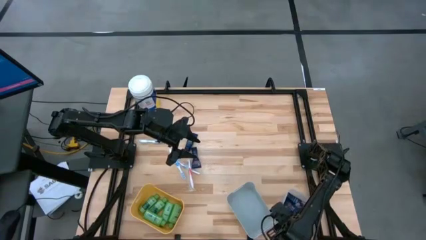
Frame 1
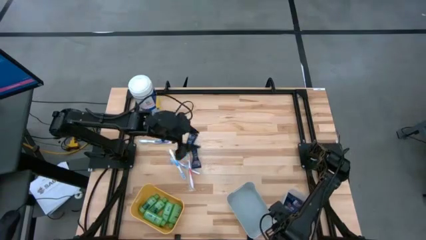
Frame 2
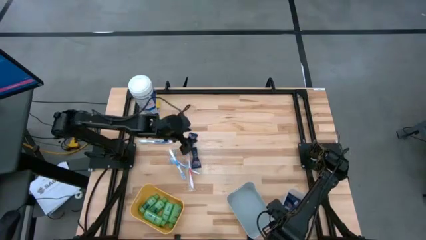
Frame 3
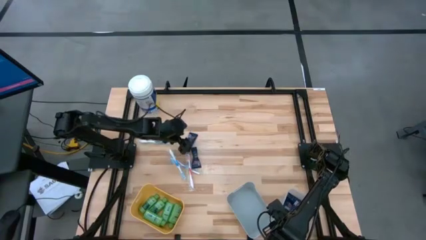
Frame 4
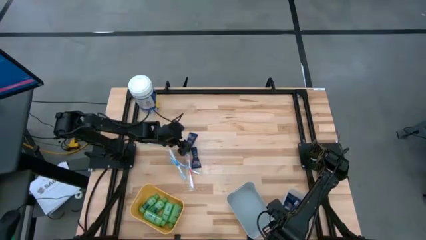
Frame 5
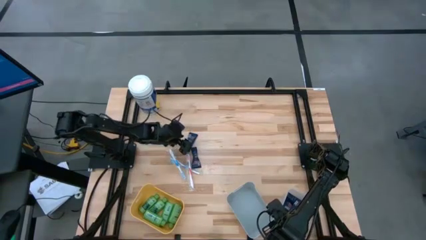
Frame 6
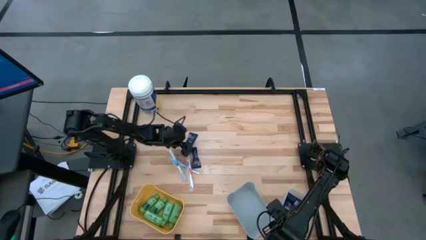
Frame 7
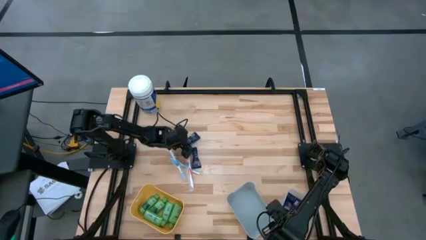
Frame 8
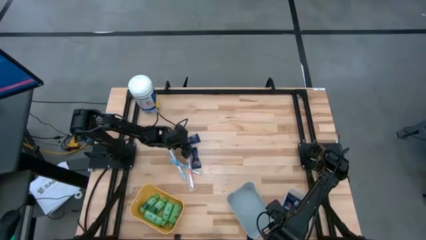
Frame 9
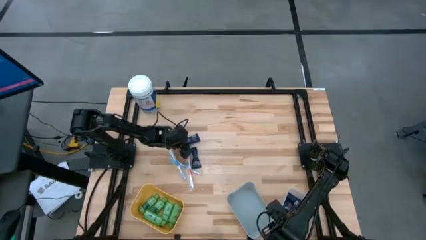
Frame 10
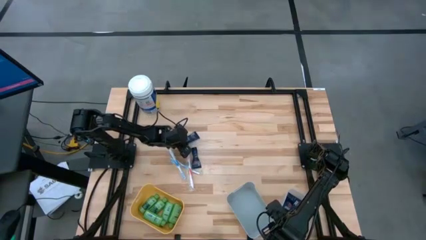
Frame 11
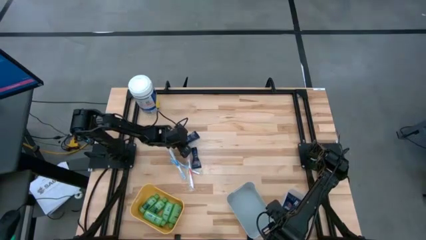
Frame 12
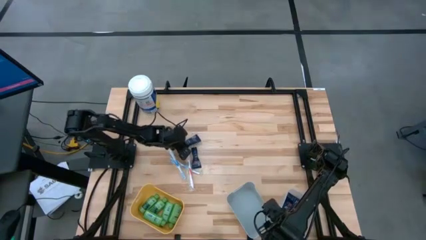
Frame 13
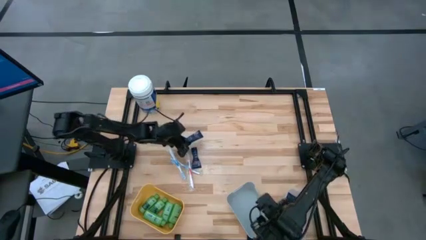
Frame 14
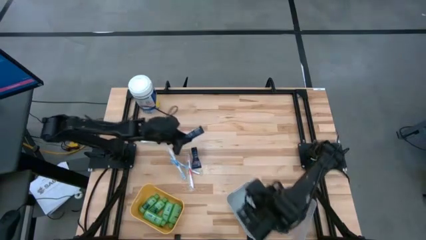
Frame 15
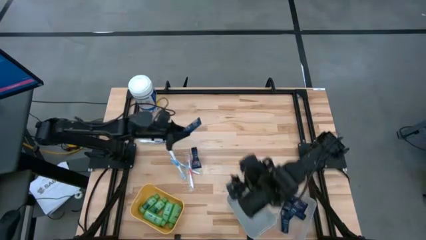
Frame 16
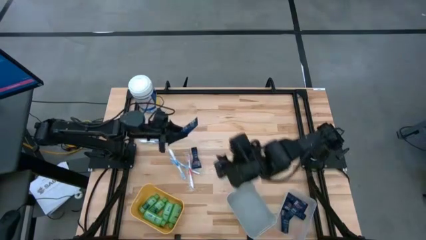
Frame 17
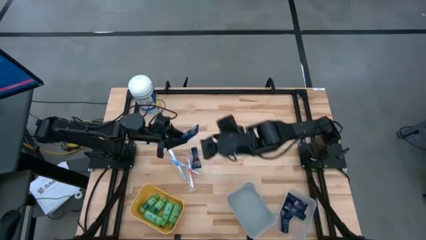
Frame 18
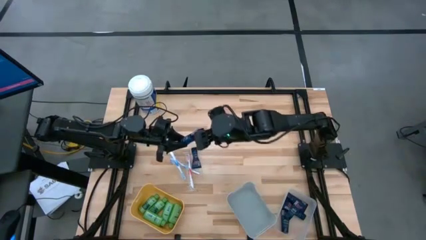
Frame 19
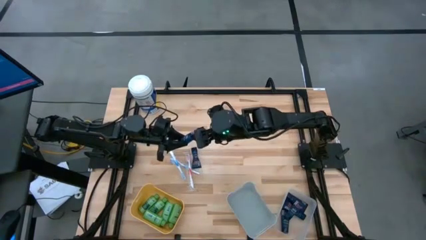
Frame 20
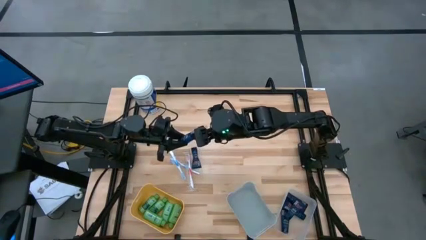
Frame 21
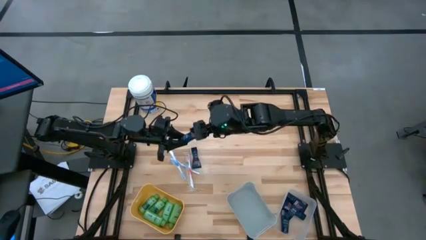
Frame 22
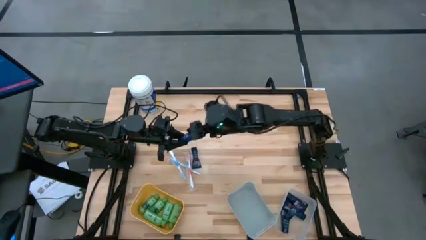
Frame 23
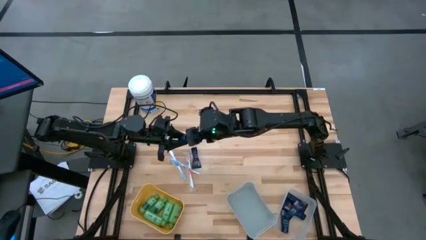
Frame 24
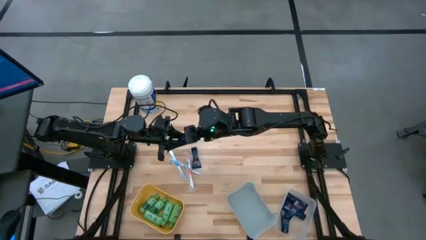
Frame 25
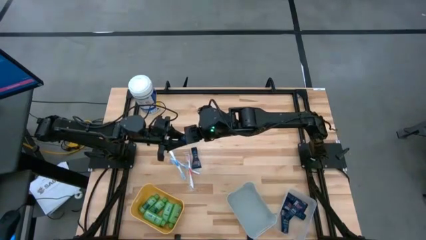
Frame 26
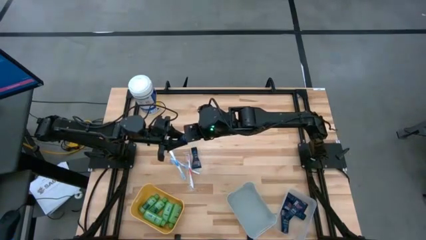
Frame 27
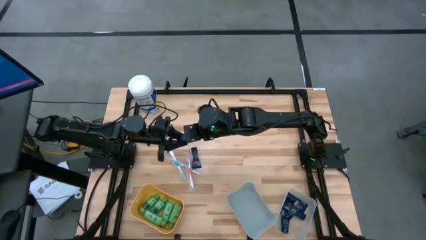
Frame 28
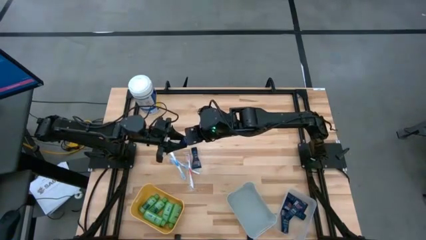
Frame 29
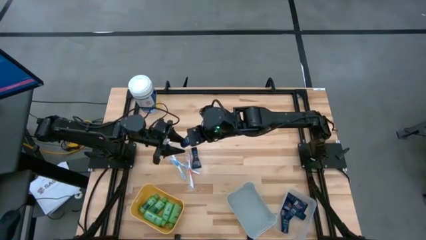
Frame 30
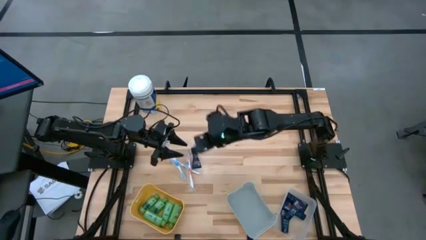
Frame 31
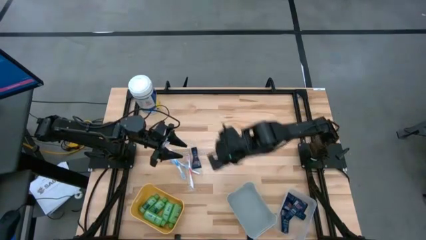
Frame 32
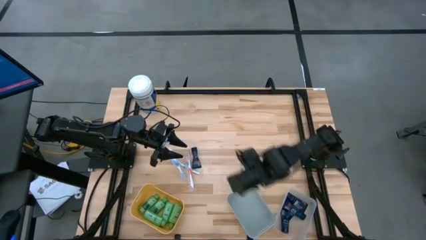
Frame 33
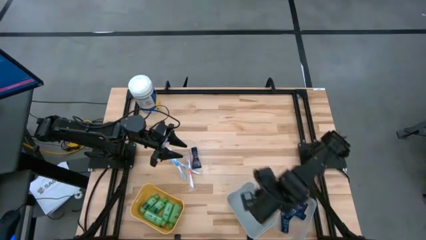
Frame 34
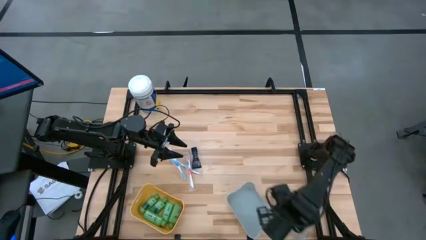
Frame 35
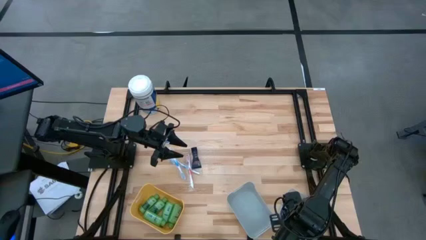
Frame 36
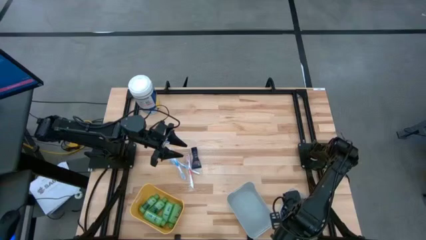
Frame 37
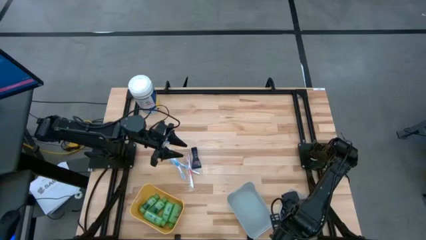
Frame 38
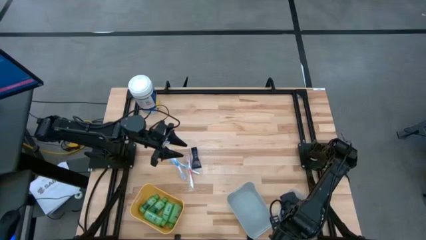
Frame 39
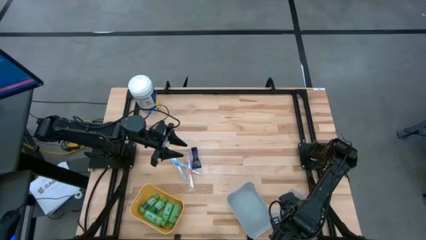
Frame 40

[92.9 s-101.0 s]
Task: Pick & Place Travel size toiletries
Put the blue shave cream into the transparent bin

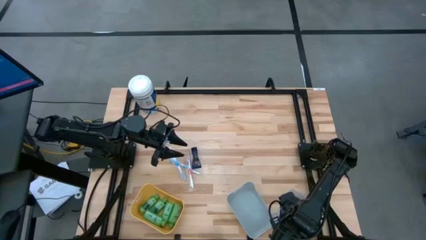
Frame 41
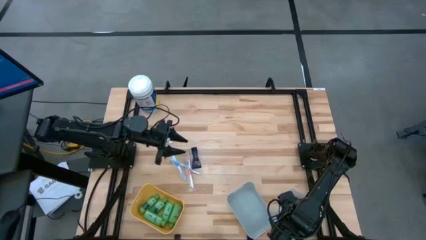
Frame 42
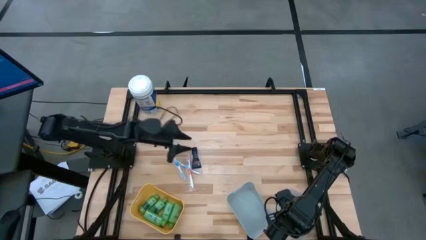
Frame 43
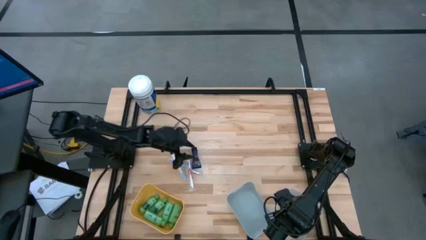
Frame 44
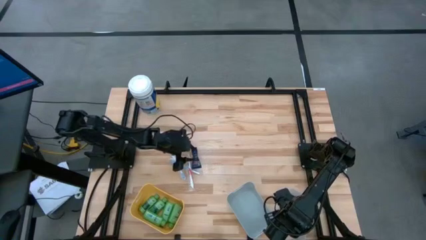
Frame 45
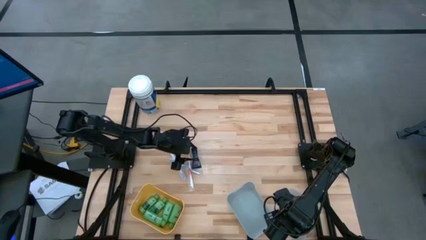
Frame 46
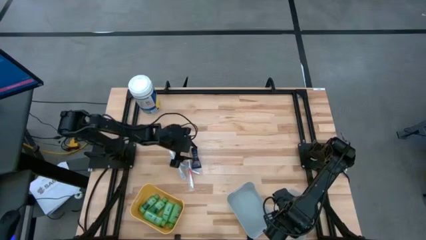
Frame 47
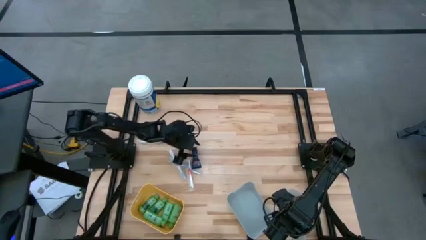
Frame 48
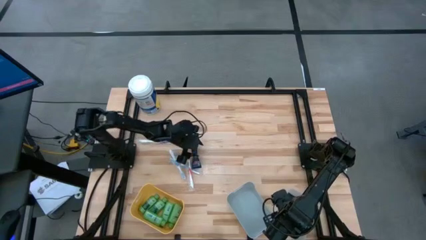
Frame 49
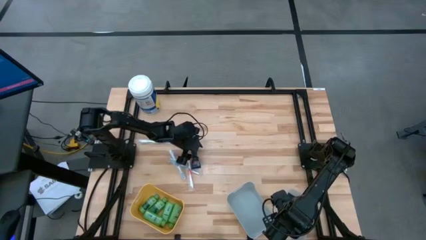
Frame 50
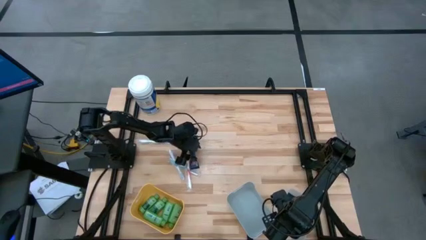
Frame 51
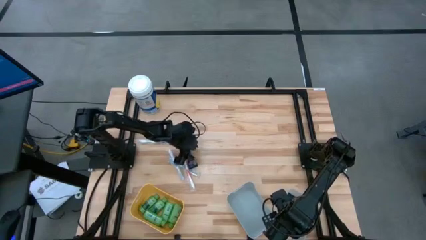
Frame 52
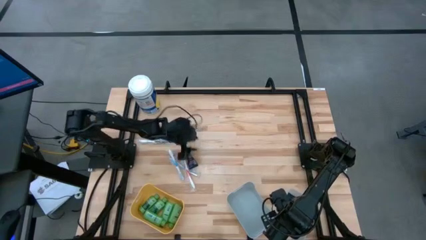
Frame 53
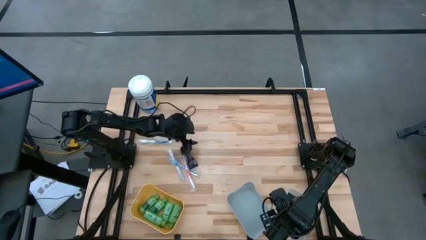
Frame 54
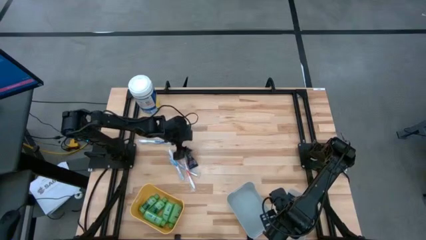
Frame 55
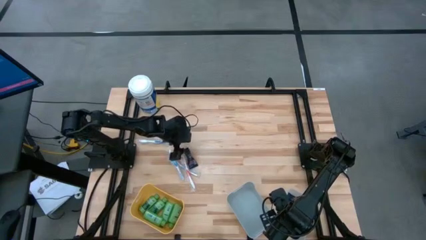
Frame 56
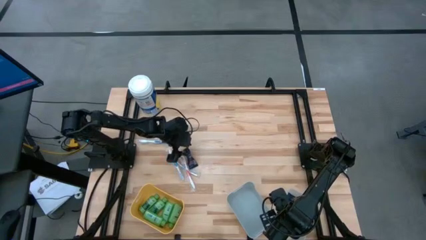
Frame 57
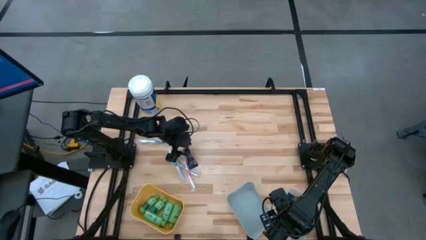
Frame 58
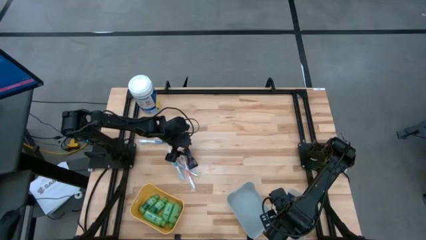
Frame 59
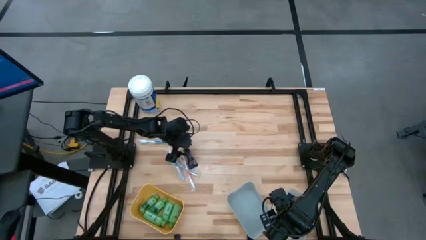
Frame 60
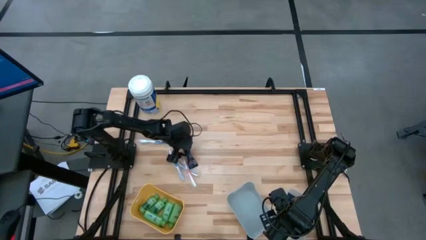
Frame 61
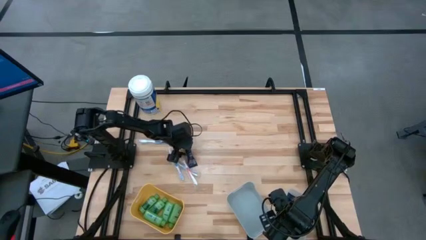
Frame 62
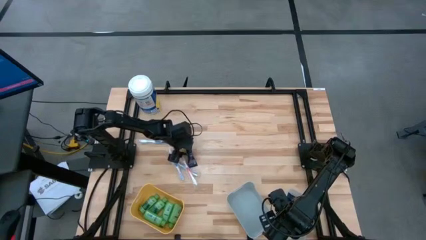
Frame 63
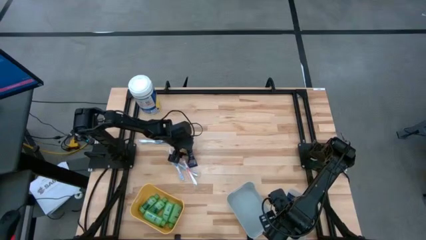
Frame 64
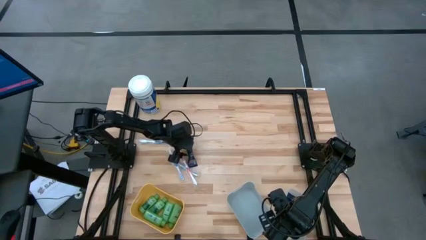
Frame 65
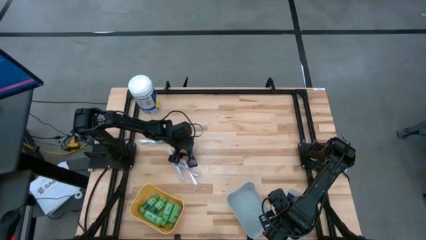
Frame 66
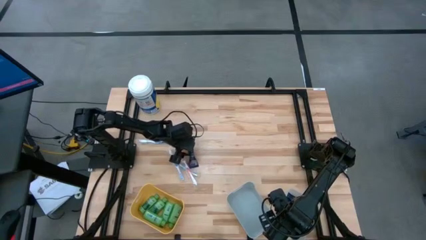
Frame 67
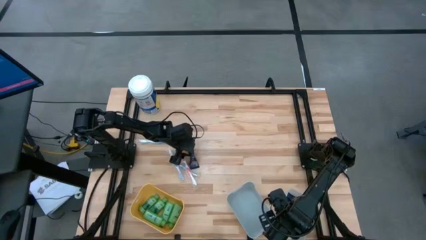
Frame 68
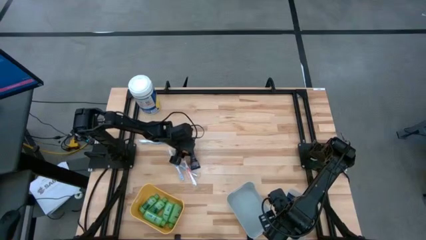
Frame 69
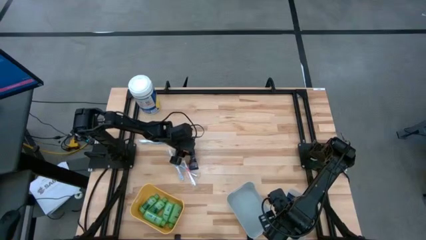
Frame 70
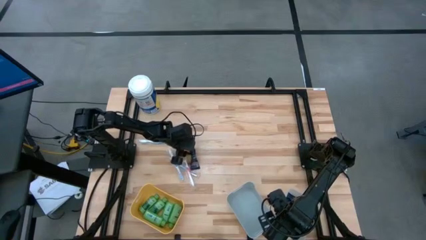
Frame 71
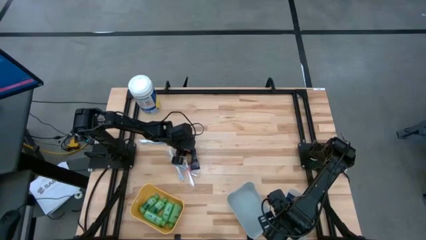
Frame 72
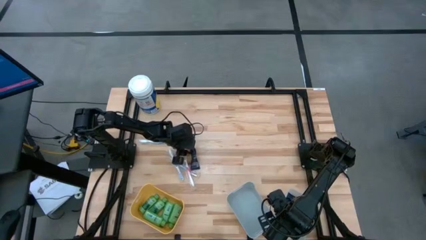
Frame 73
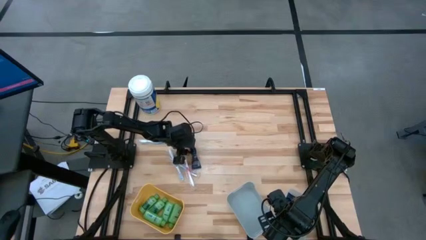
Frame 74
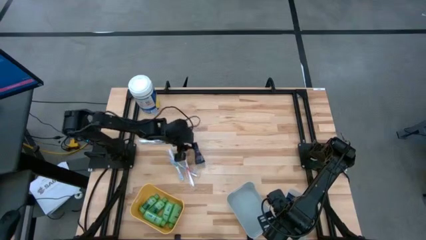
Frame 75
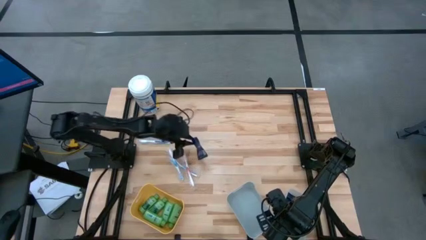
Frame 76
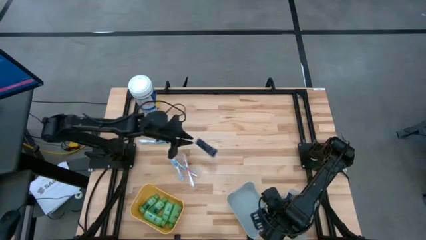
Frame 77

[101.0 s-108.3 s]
Put the blue shave cream into the transparent bin

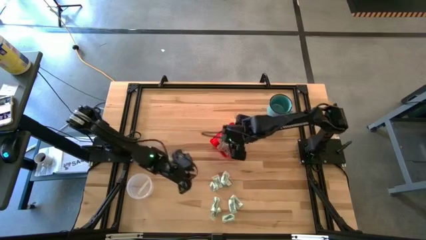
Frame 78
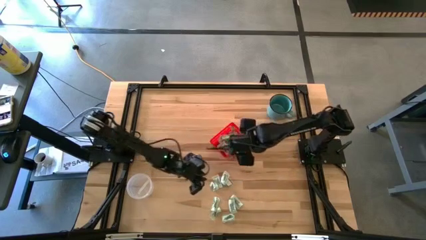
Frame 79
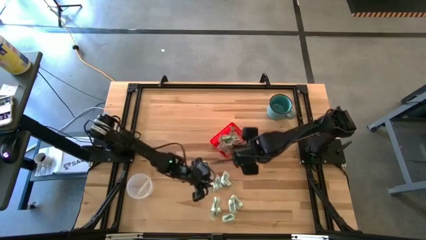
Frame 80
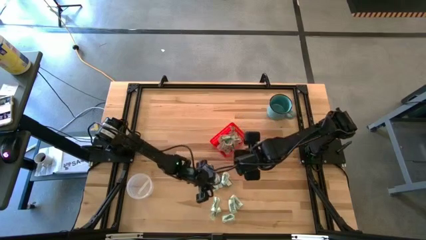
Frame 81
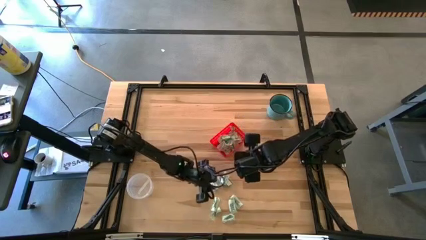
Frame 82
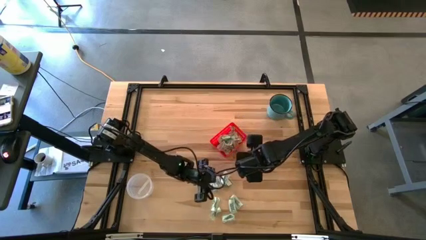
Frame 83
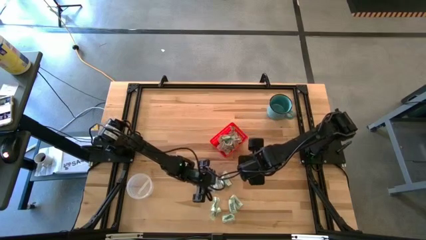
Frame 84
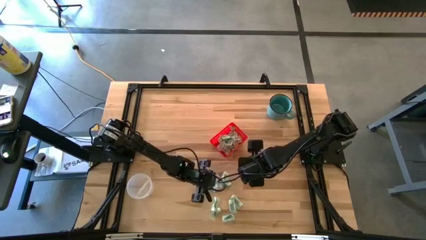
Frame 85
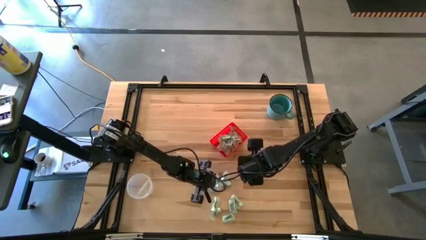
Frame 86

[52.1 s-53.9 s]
Task: Pick and place items into bin
Put the stevia packet into the red bin
